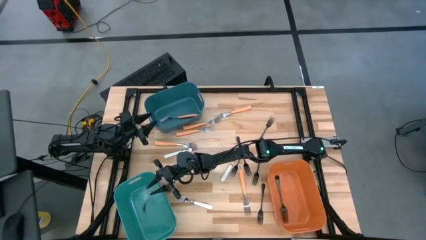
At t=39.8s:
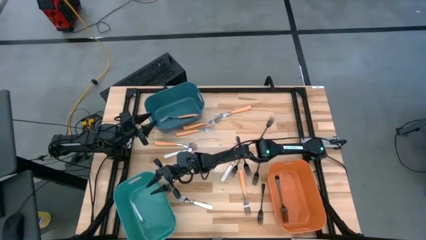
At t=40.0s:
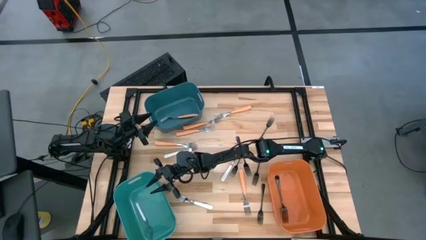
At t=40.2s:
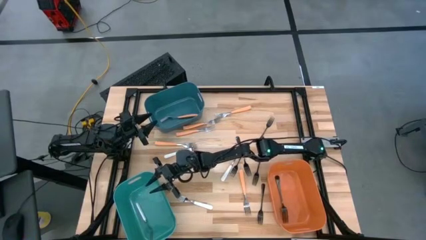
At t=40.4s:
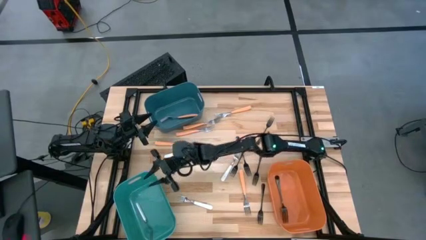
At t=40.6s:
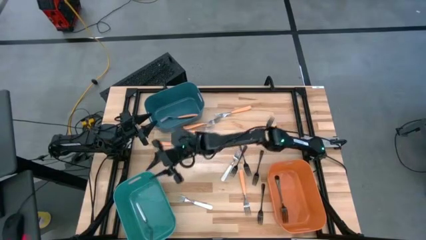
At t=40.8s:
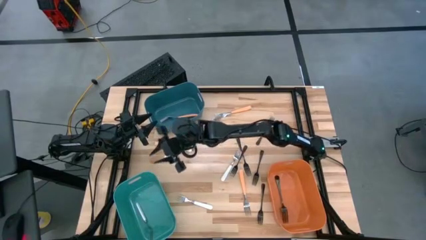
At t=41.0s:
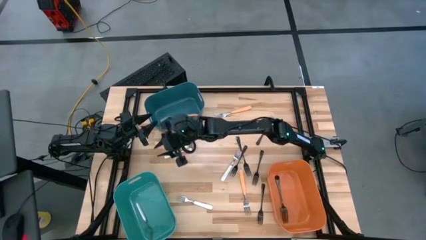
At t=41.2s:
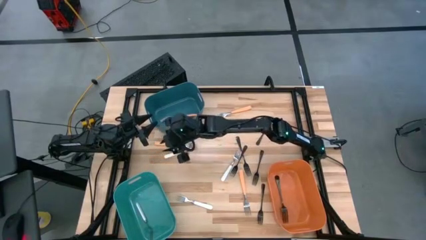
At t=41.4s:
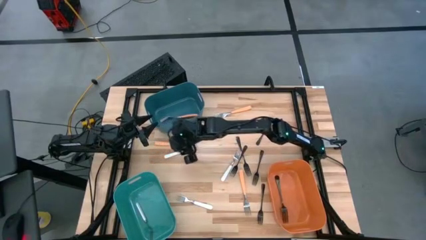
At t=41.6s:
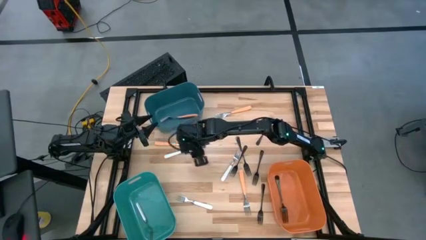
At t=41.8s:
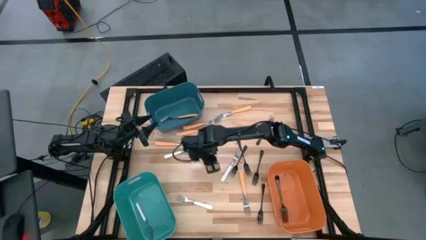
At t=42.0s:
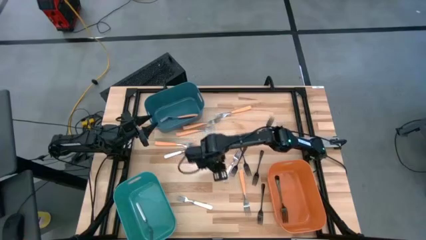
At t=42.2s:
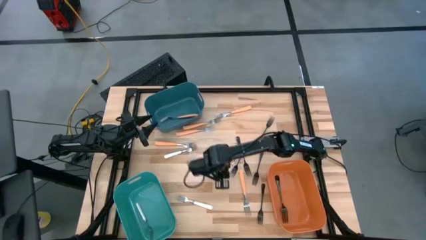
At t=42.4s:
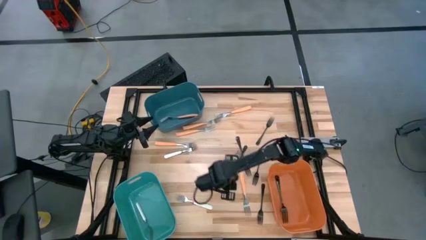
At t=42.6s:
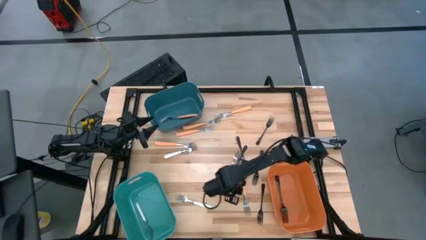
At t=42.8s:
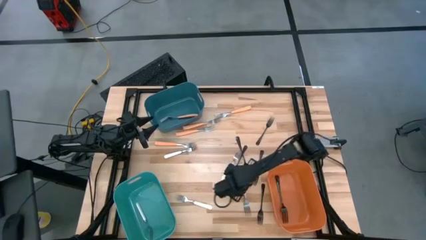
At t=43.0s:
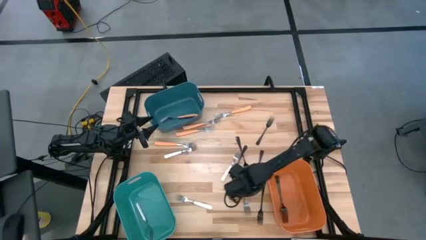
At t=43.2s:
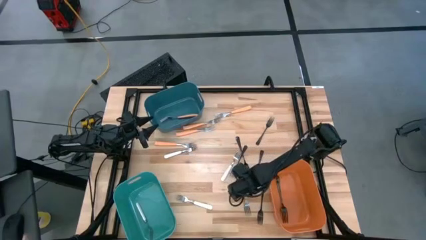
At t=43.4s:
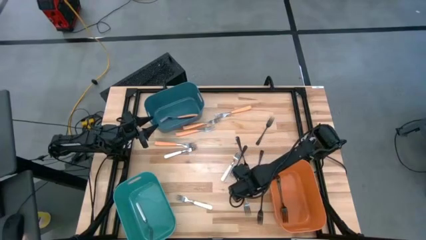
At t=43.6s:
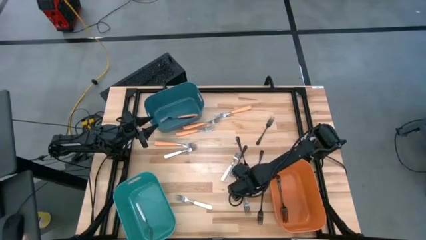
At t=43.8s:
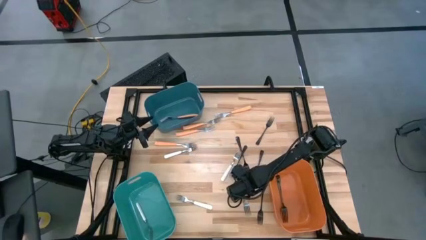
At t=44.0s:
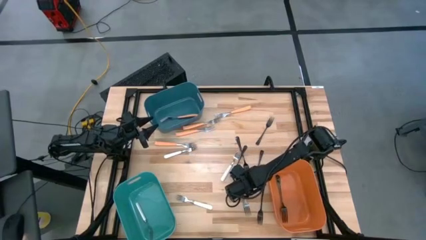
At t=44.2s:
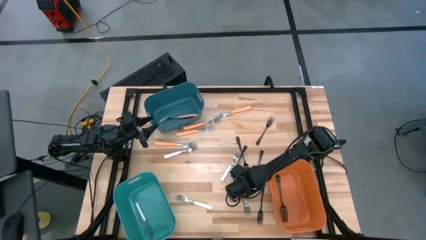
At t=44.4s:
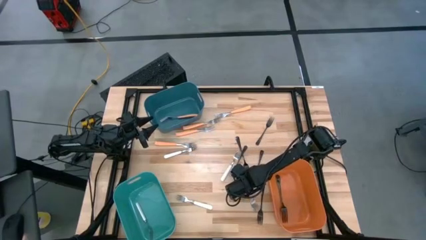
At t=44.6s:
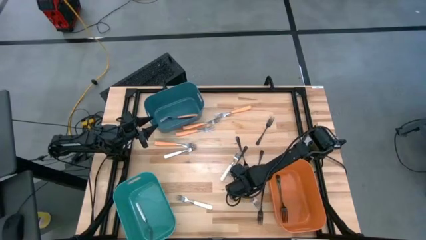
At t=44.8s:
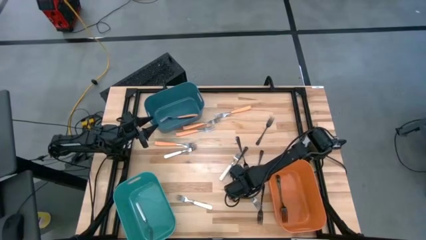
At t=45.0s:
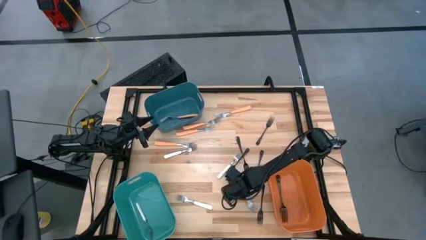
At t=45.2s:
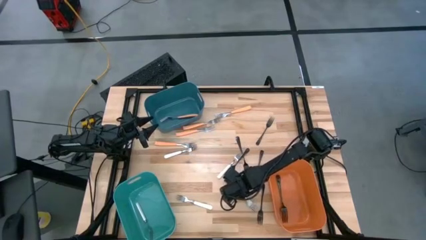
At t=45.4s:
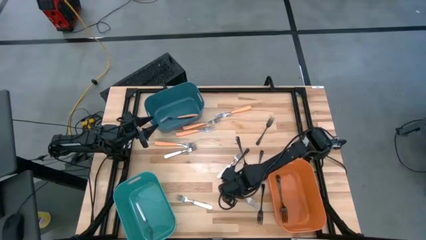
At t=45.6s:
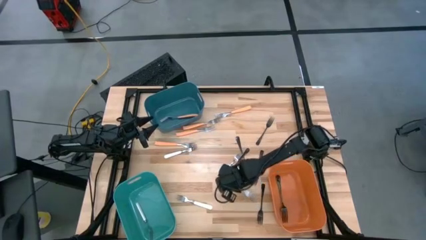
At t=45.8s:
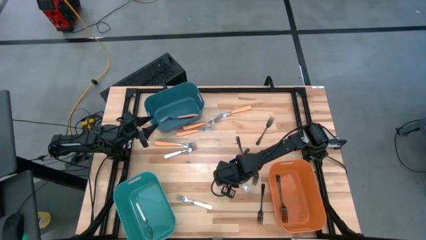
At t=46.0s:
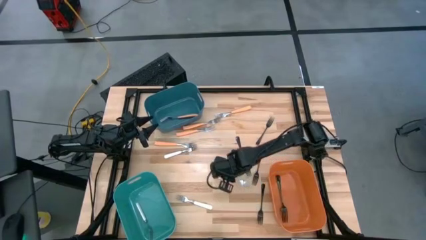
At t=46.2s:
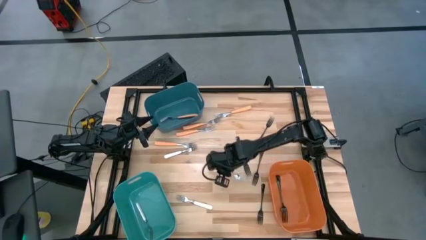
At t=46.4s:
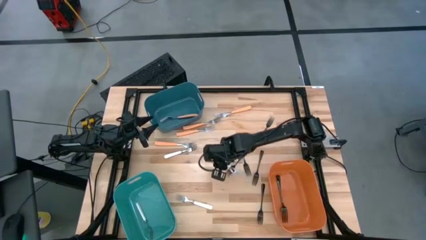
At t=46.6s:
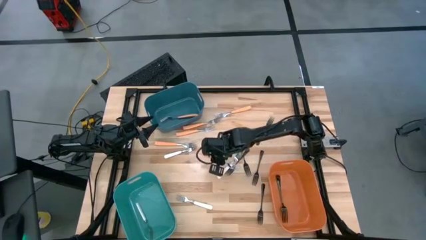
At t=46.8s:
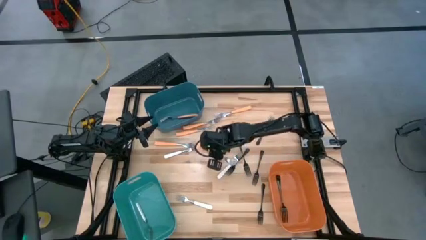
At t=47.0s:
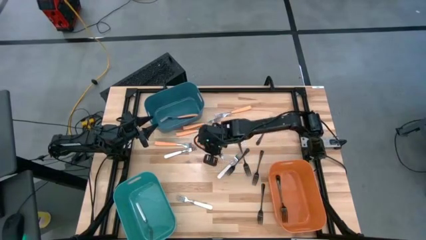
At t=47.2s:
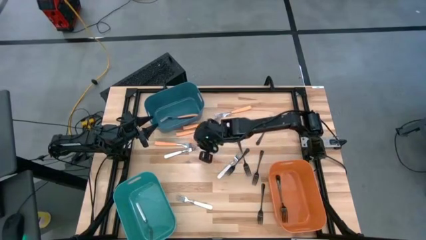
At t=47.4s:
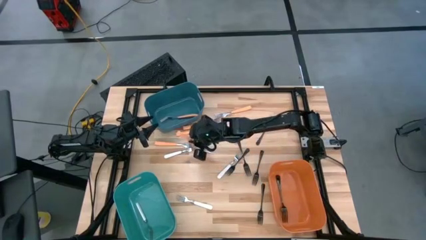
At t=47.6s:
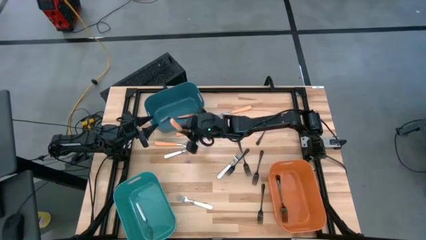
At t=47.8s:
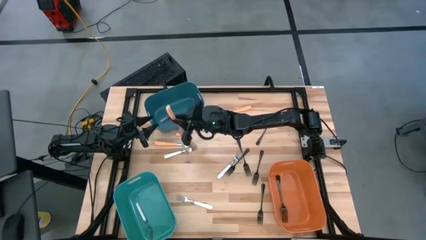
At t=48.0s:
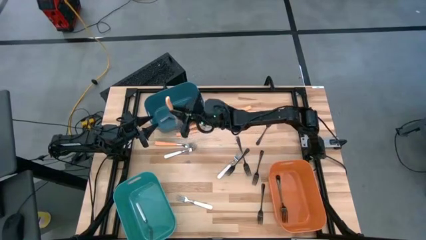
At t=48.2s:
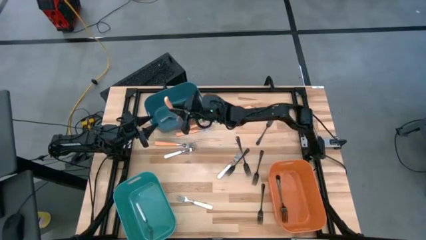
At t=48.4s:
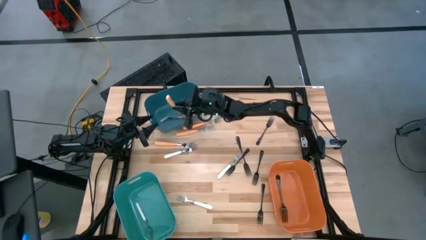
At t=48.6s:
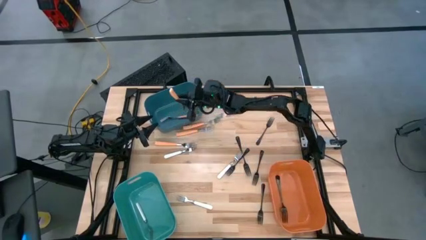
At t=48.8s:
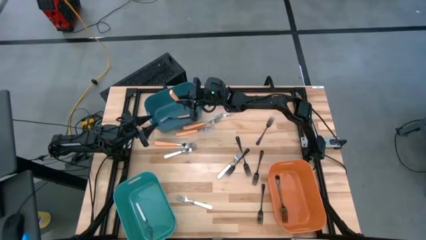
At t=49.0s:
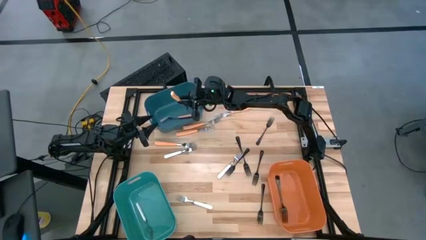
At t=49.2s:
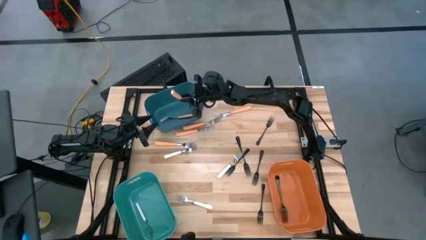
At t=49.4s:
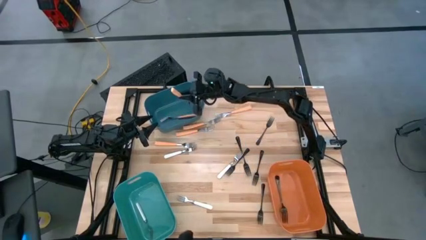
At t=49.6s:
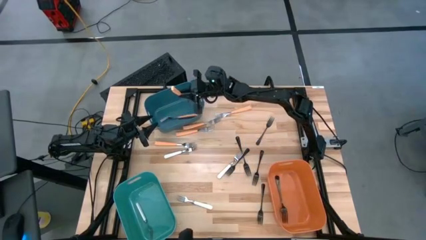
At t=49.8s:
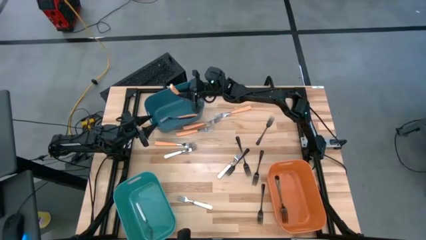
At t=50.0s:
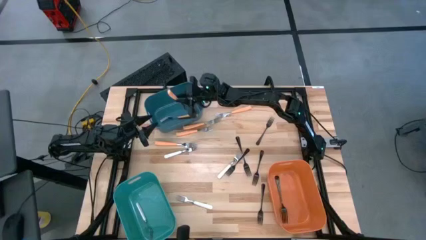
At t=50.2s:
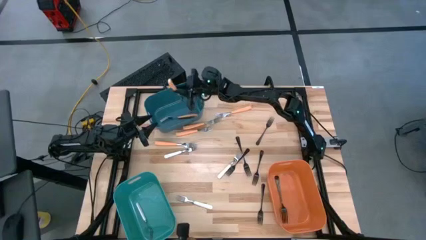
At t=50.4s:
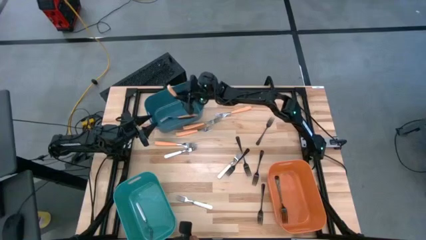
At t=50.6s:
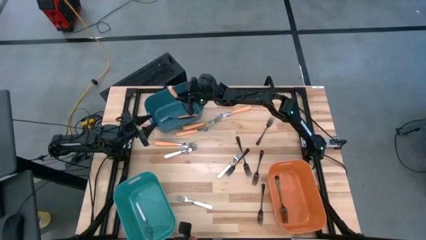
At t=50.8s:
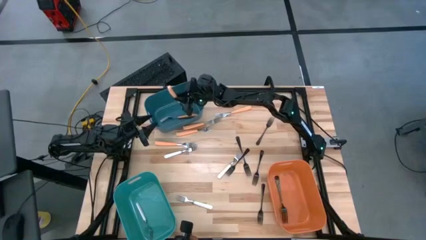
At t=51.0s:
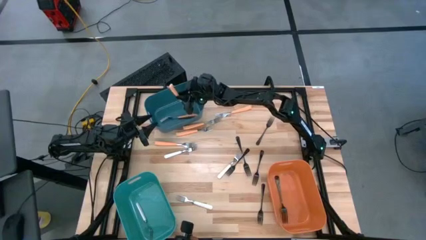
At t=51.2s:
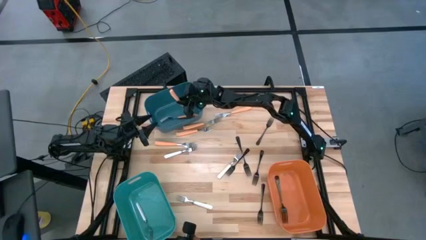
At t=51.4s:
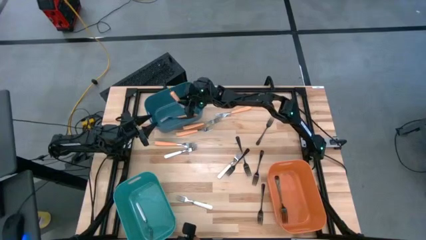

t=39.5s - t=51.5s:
Task: Sort silverware by color (type)
Put the orange fork into the blue bin
